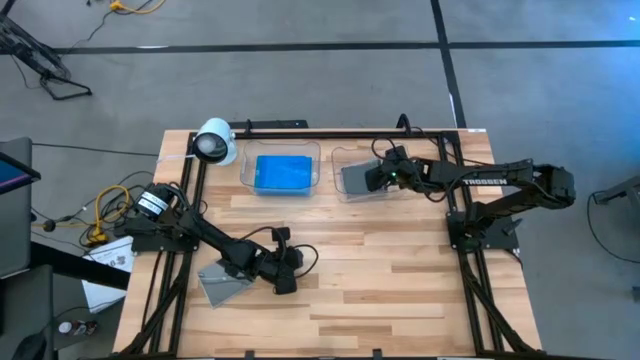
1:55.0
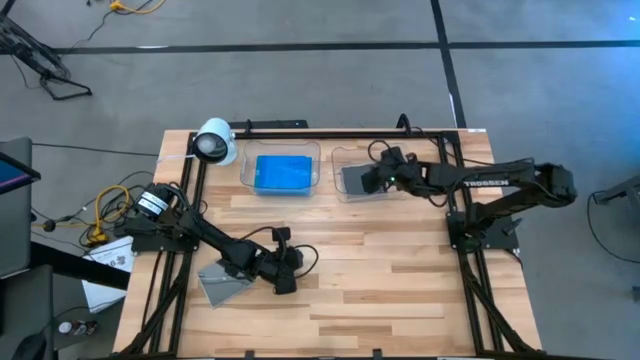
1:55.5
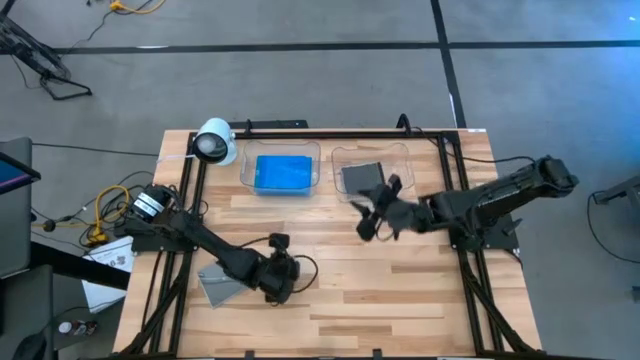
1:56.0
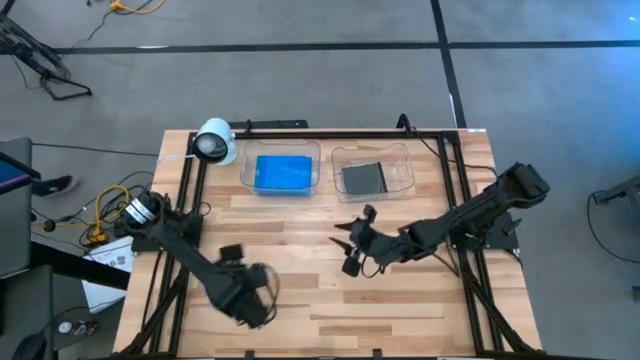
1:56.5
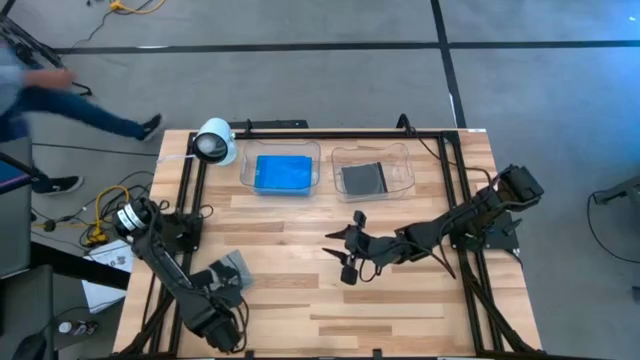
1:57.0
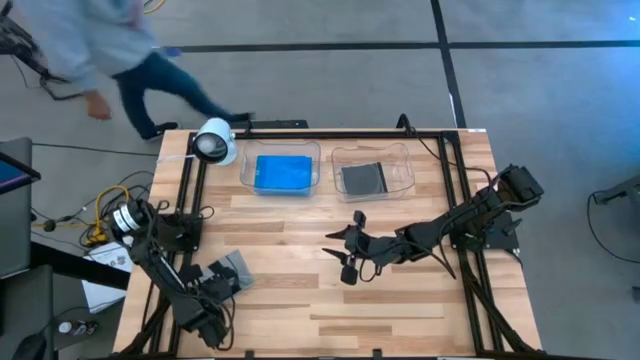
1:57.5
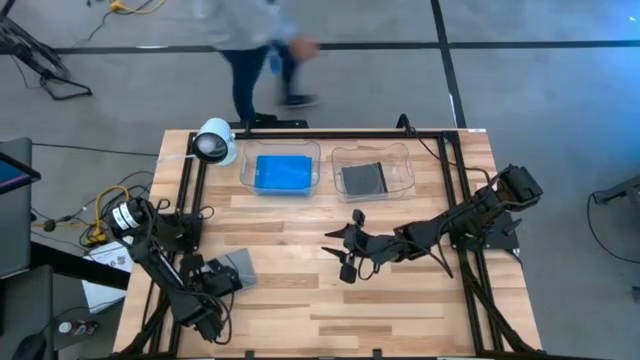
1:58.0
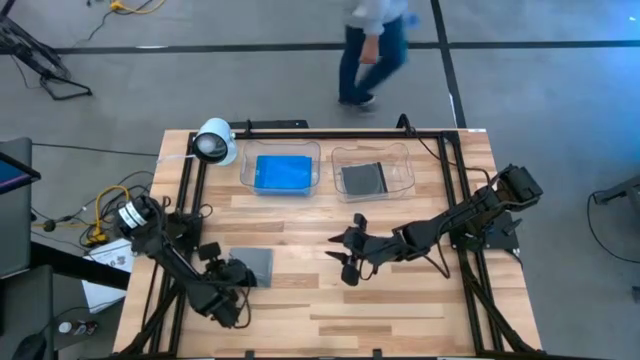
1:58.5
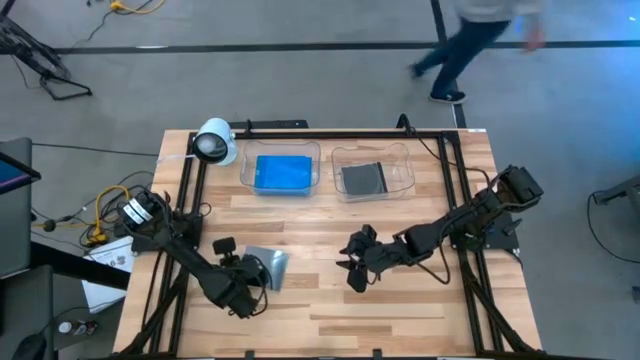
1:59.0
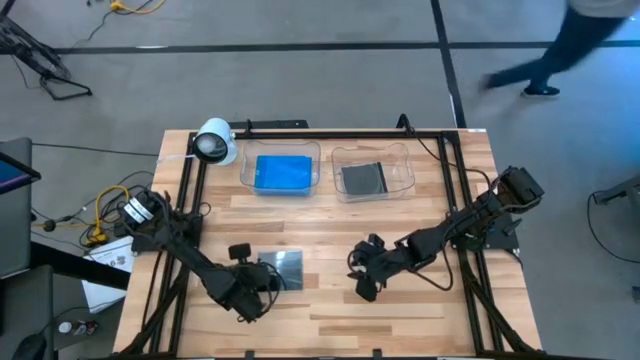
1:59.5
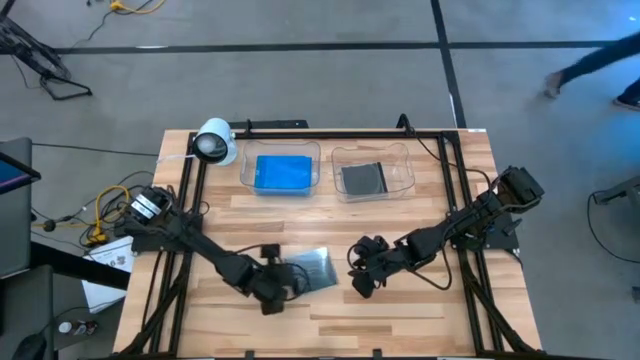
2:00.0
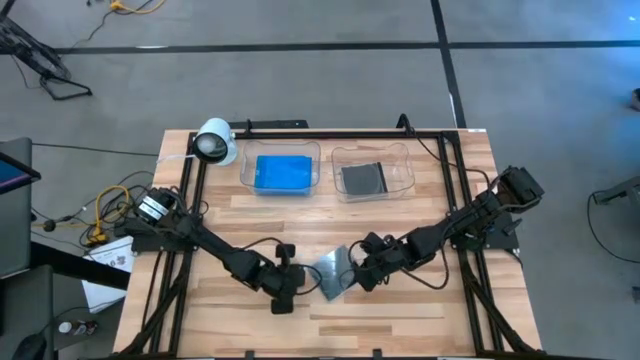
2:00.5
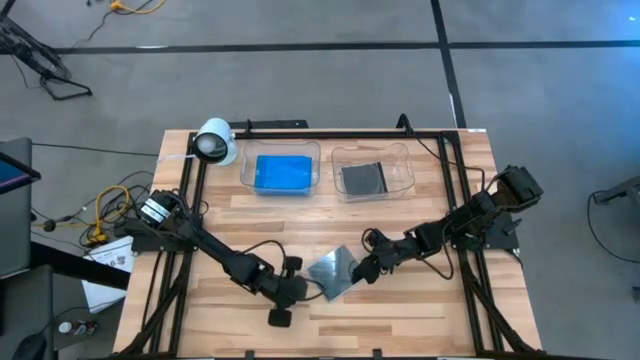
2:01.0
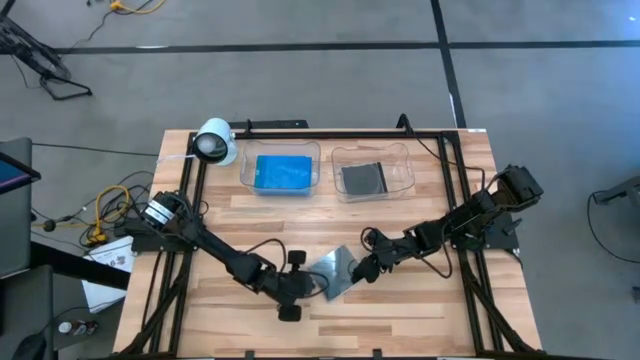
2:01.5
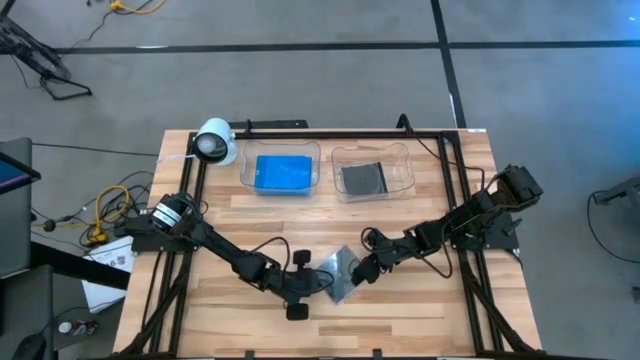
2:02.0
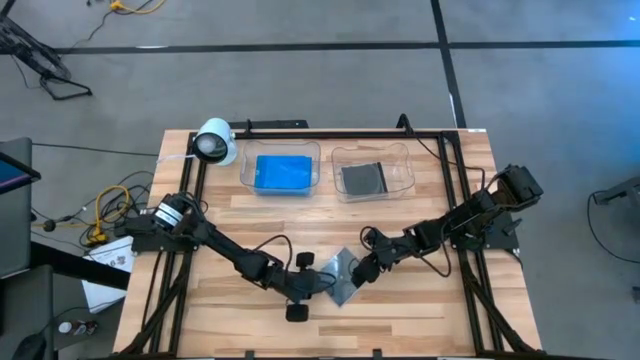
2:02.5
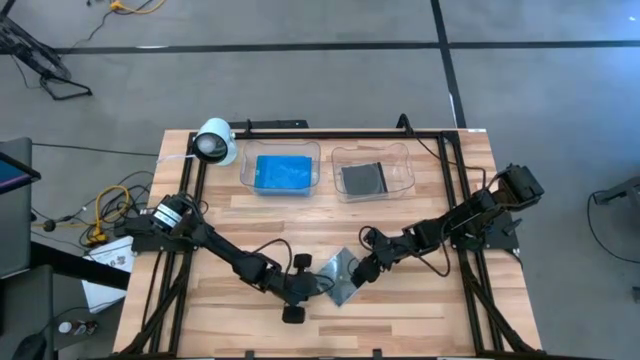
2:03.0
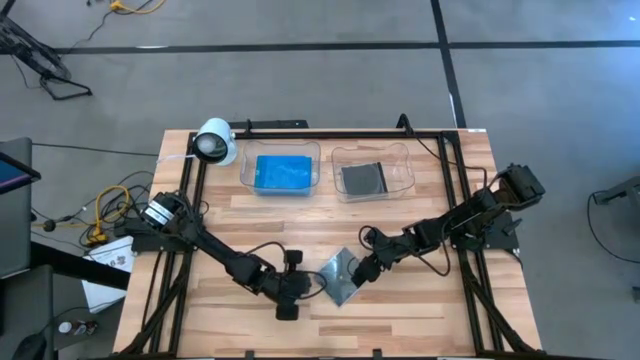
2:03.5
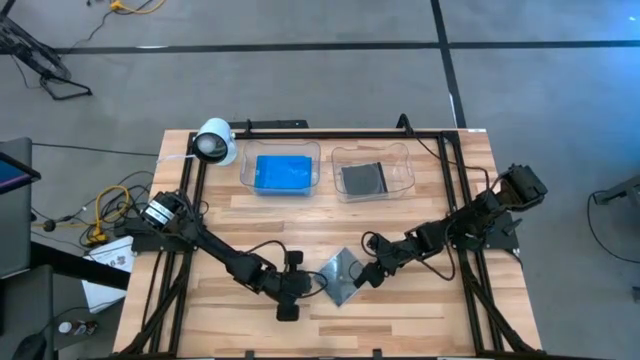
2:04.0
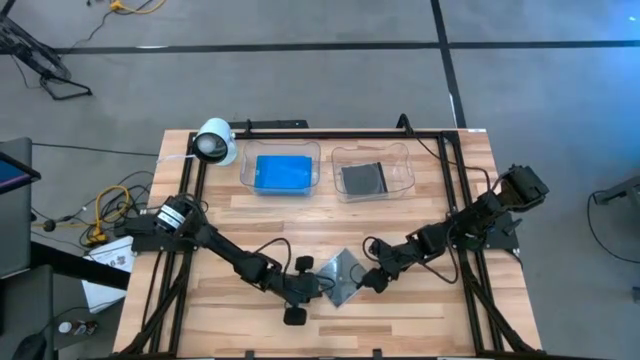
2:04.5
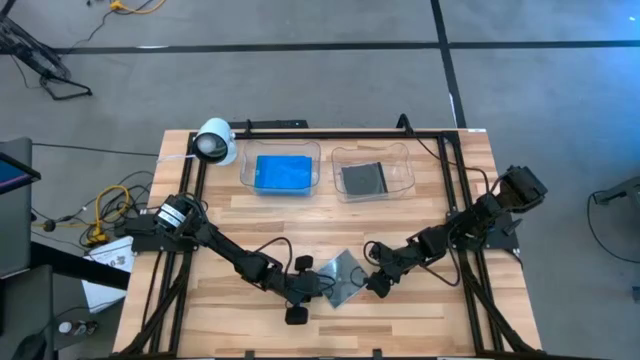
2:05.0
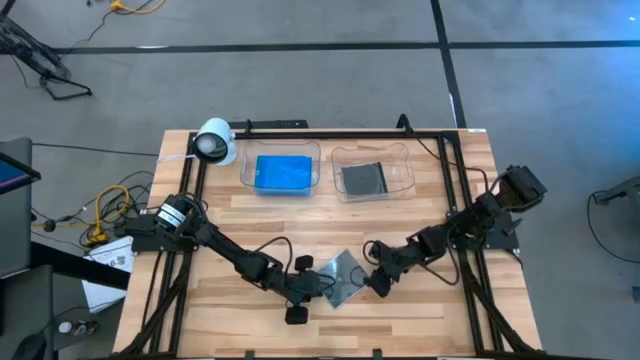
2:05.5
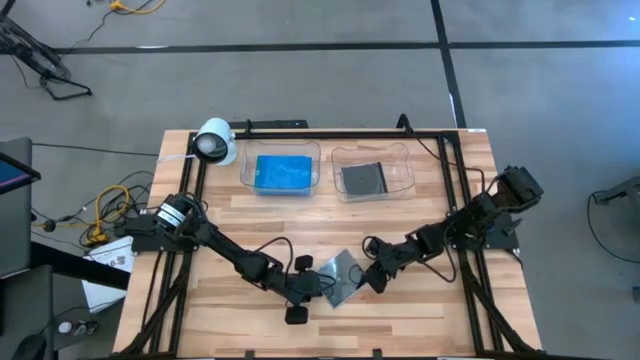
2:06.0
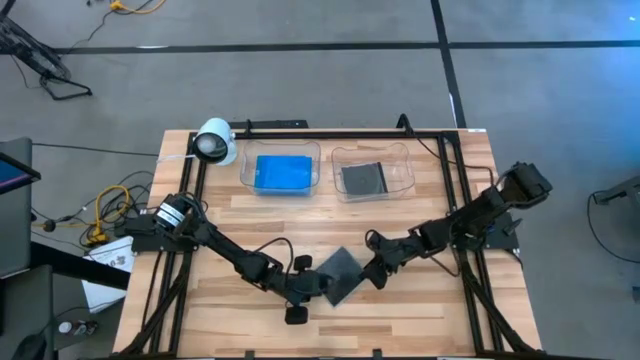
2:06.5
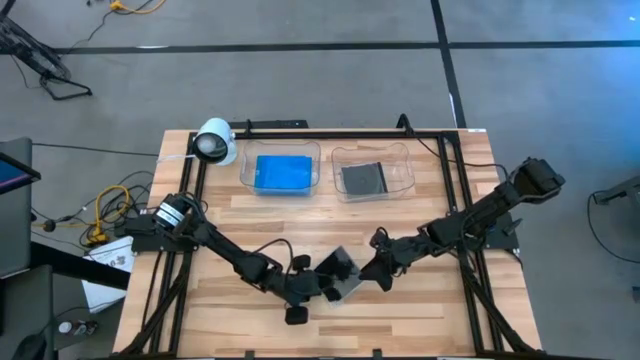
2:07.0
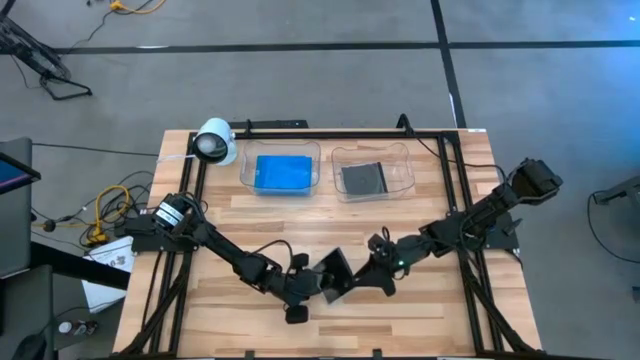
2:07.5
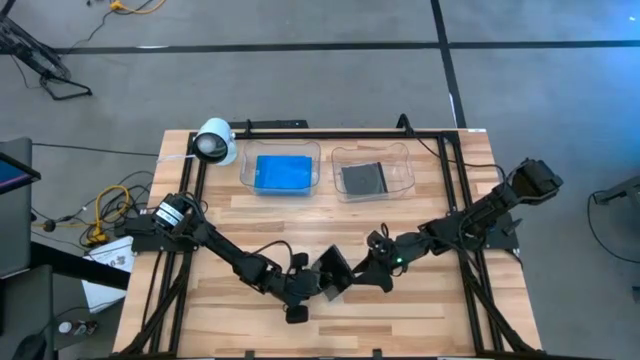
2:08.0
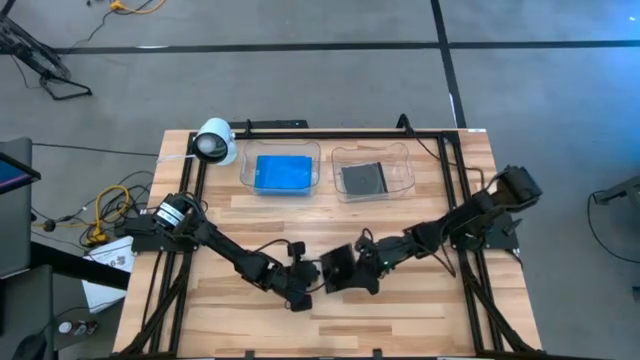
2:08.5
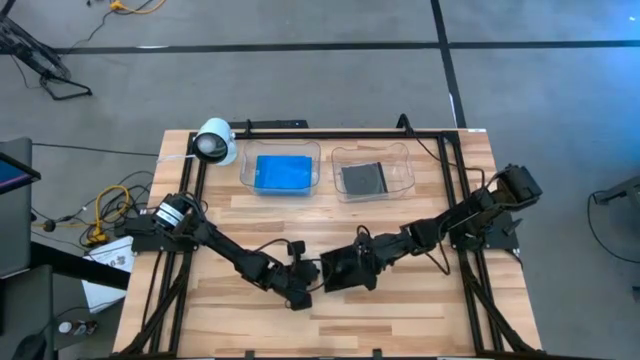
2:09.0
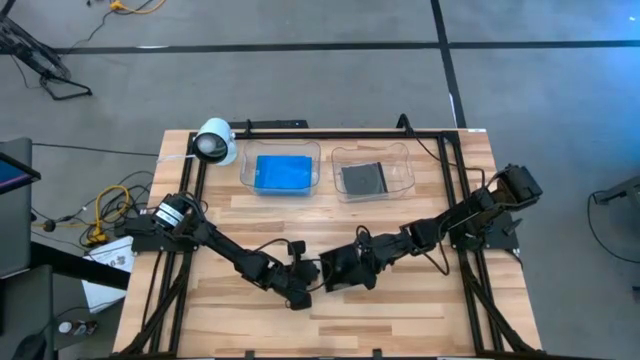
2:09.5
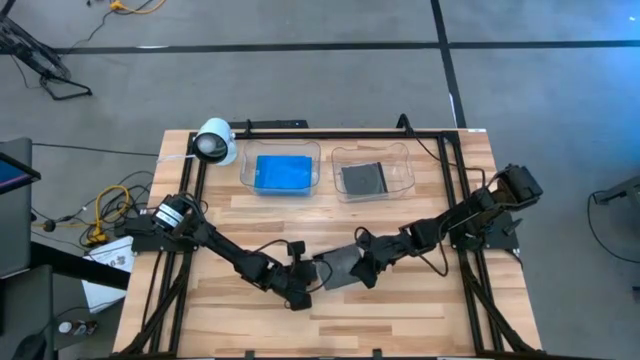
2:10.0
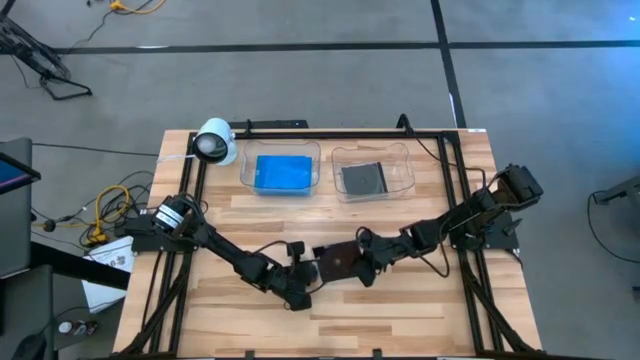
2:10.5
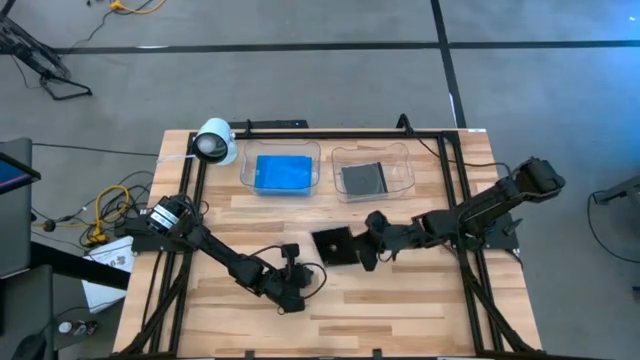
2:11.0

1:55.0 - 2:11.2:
Task: Pick & place jewel cases by type
Put the black cd case into the right transparent bin
